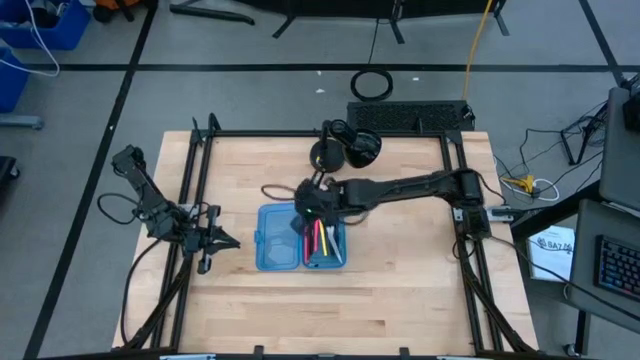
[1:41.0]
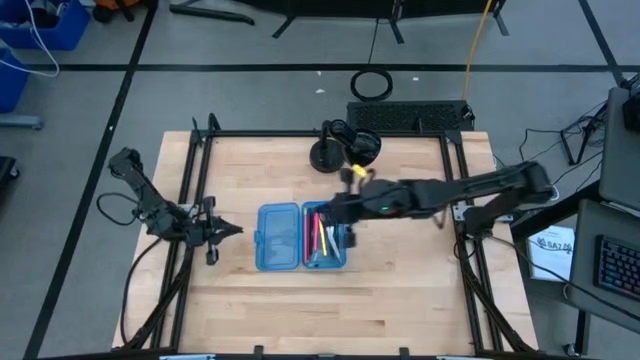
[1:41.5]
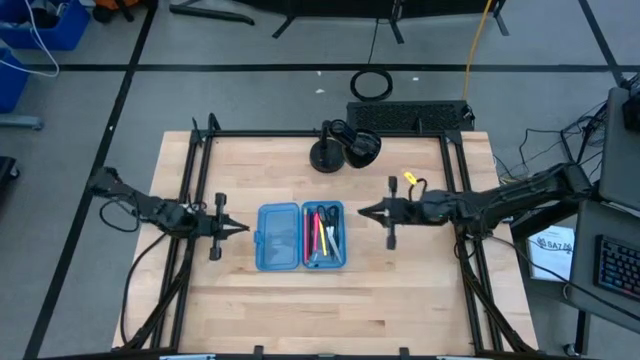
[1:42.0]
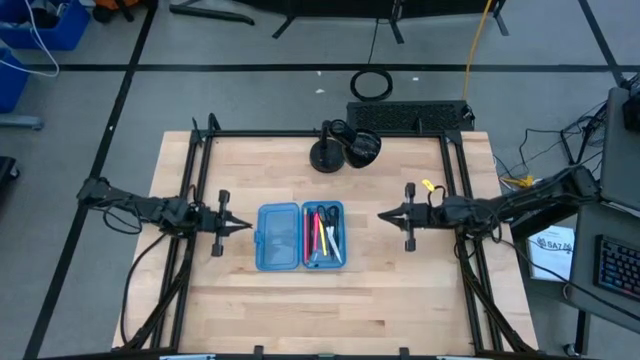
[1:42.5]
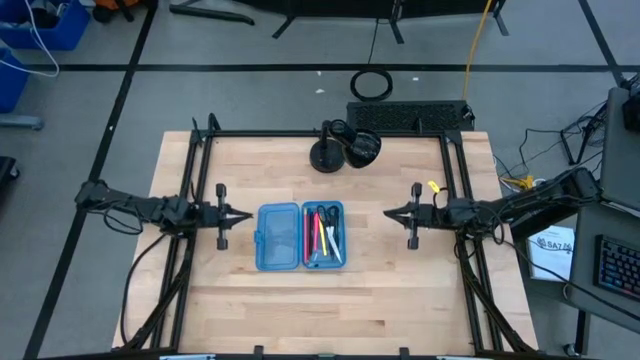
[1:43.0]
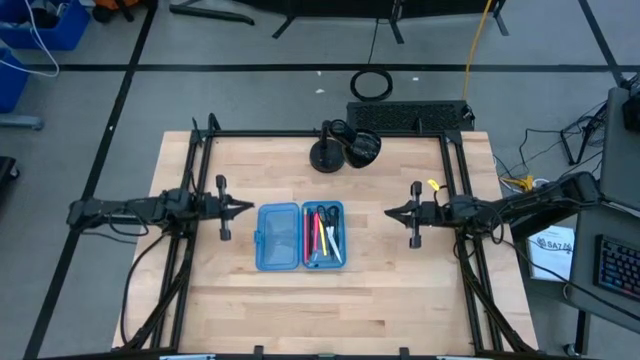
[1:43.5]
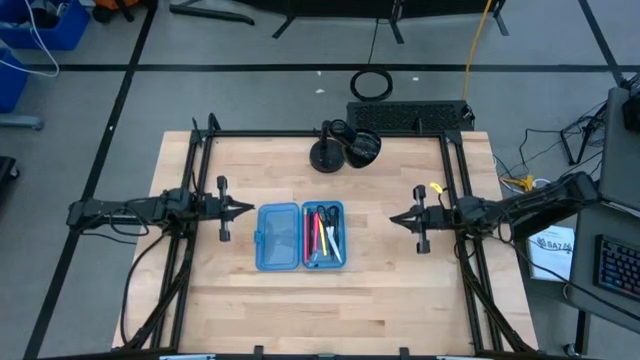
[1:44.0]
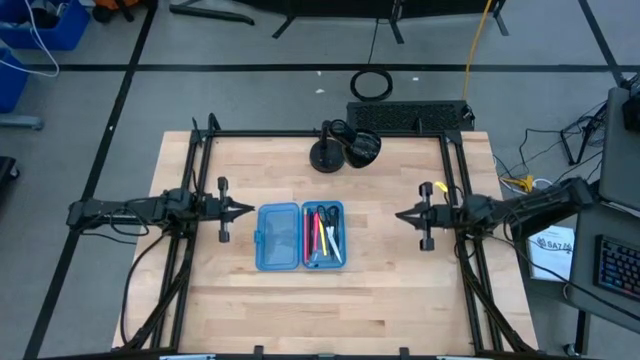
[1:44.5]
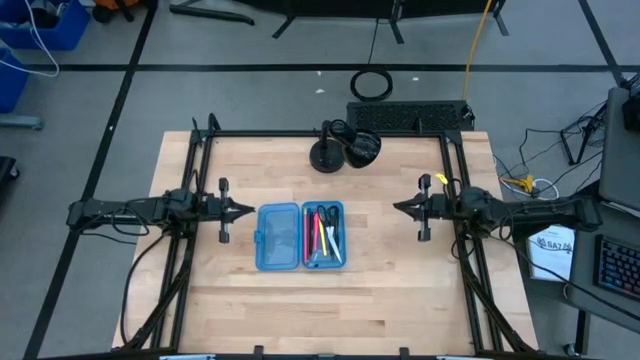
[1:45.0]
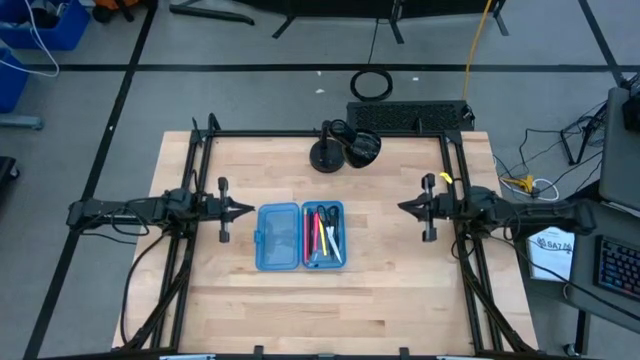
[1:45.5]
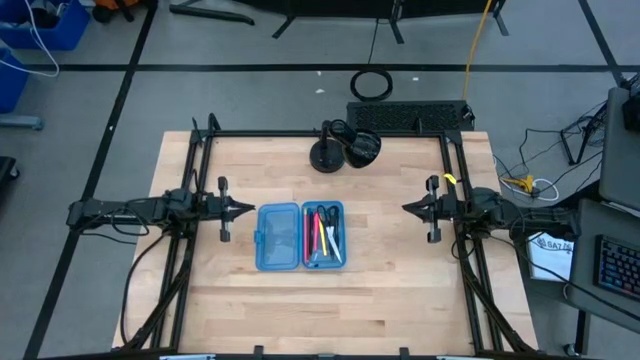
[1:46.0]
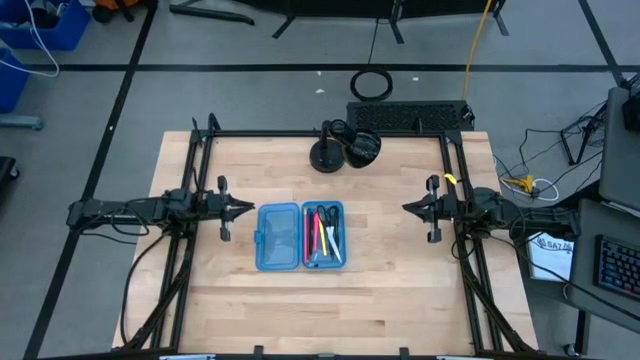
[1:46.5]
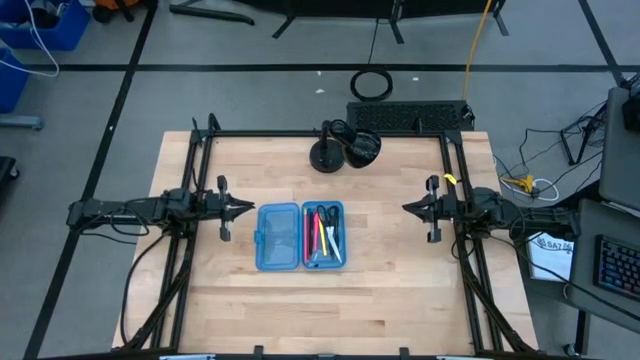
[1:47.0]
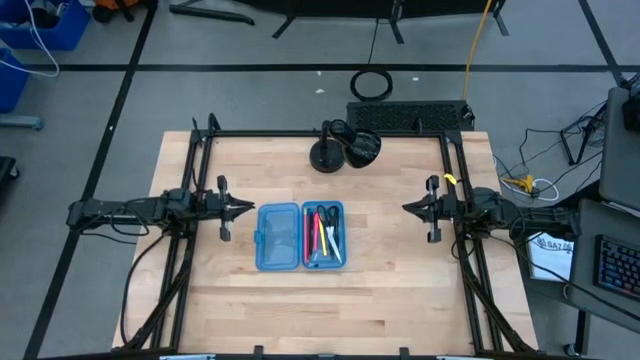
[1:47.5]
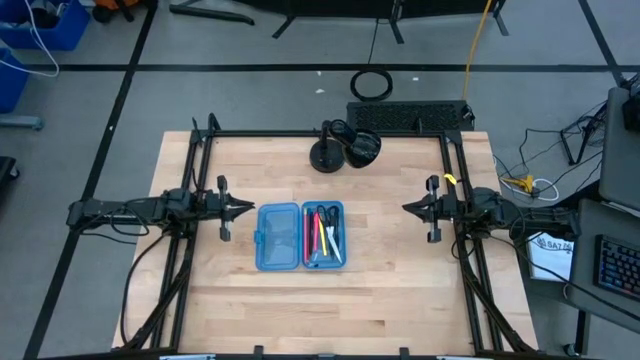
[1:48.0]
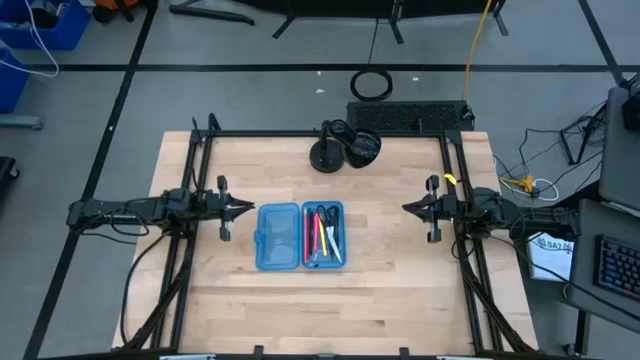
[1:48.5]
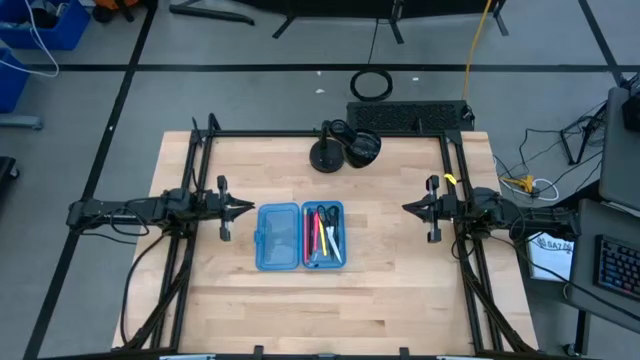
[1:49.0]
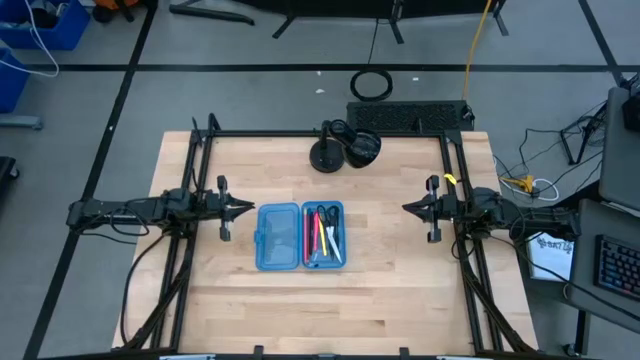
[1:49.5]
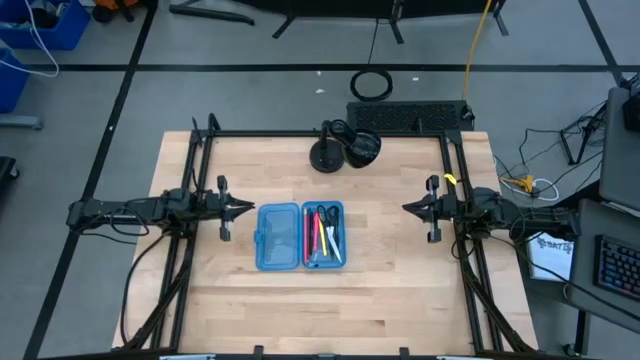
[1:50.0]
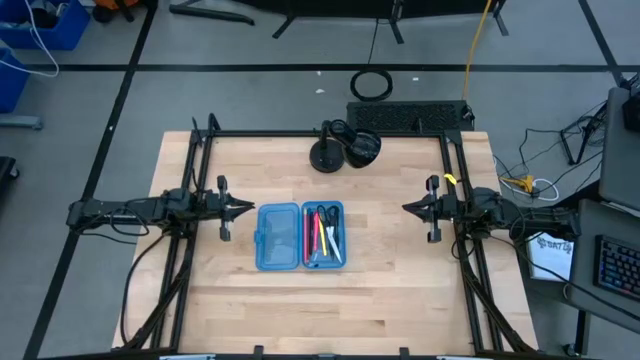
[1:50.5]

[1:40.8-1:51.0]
Task: Pick & place school supplies into a supply box
Return to Home Position

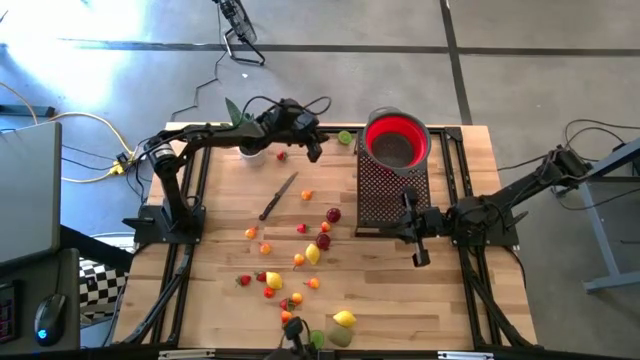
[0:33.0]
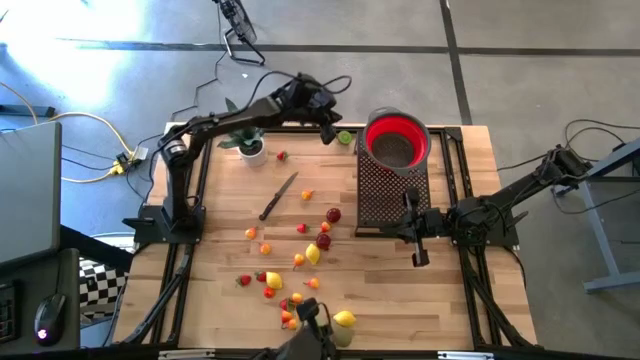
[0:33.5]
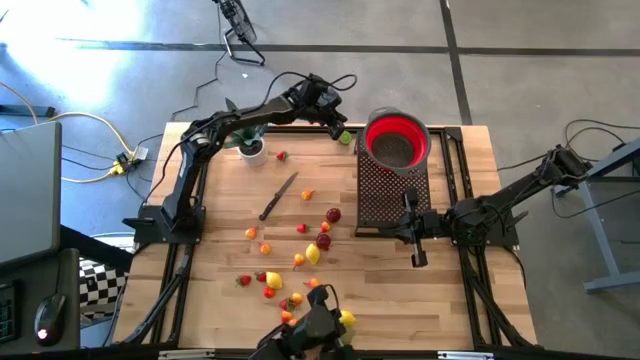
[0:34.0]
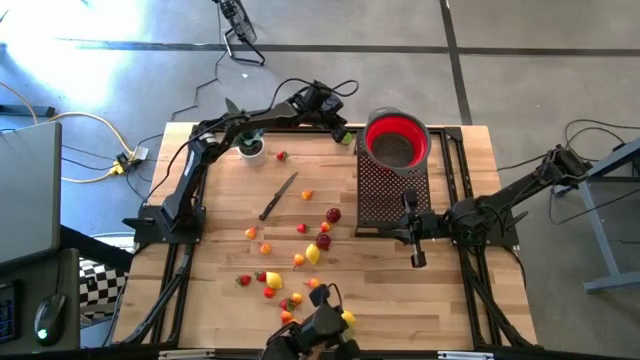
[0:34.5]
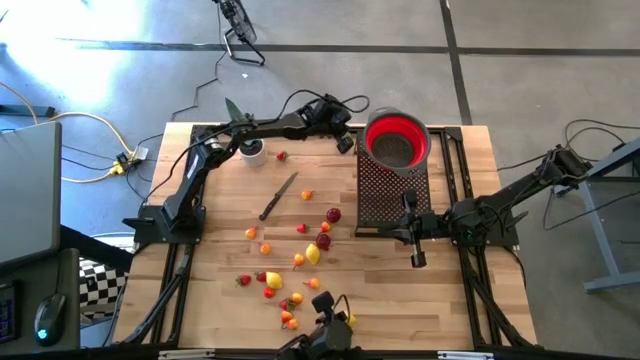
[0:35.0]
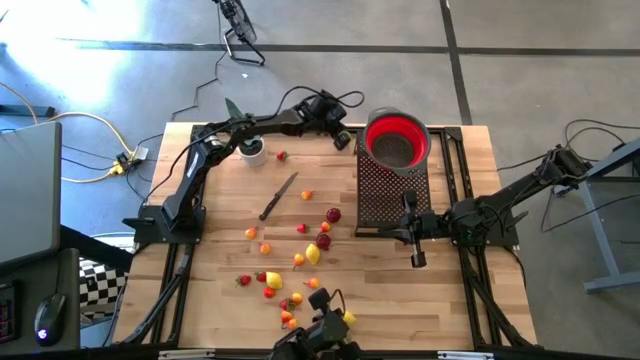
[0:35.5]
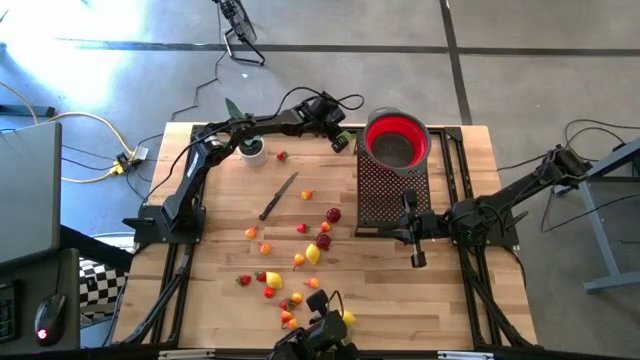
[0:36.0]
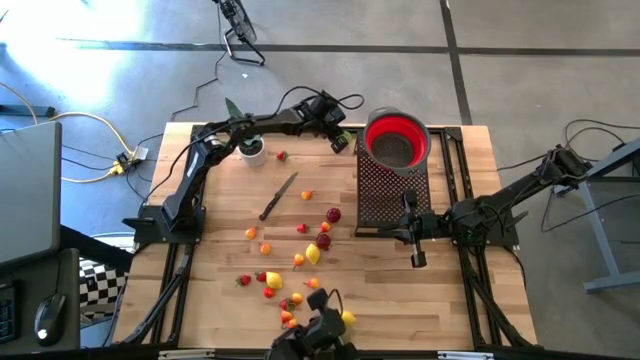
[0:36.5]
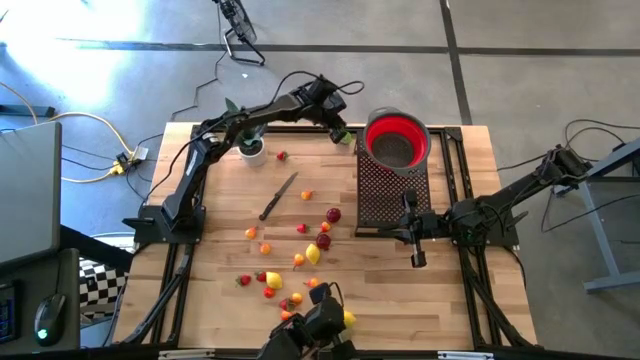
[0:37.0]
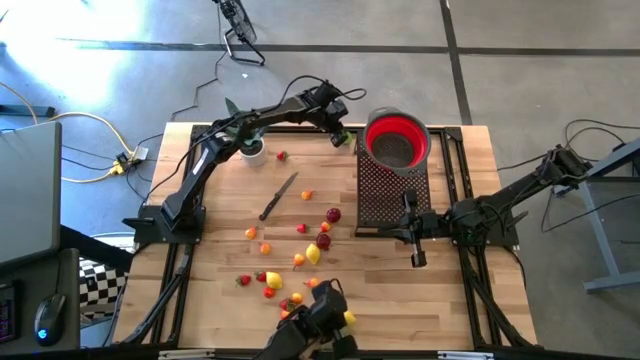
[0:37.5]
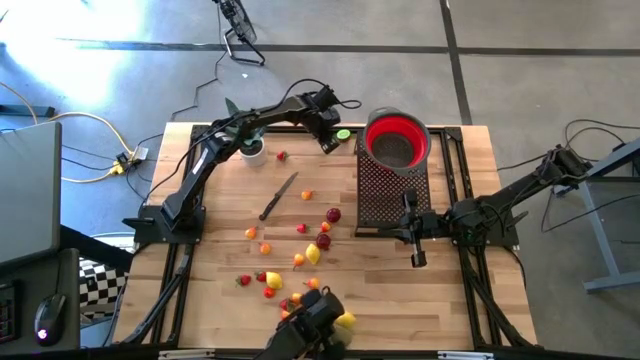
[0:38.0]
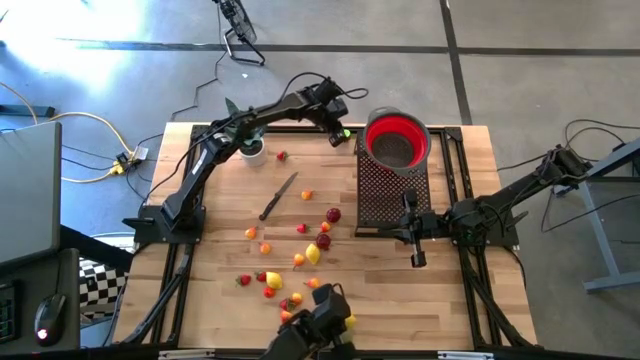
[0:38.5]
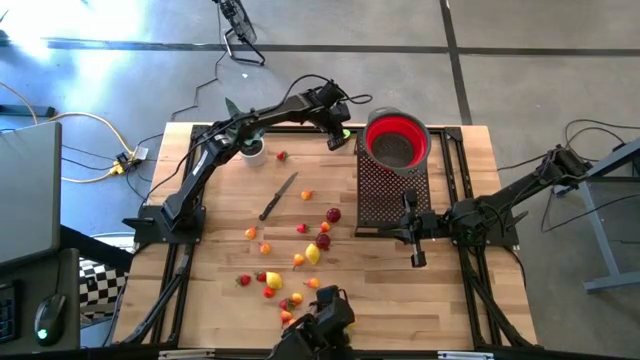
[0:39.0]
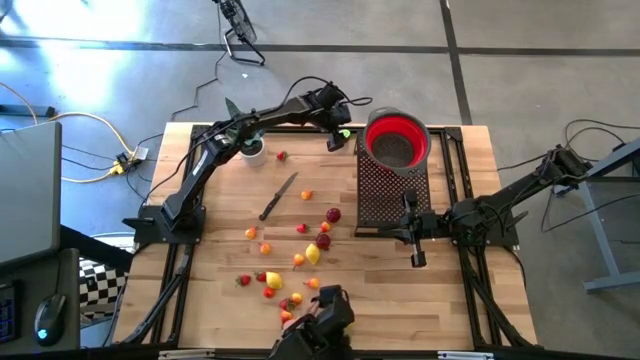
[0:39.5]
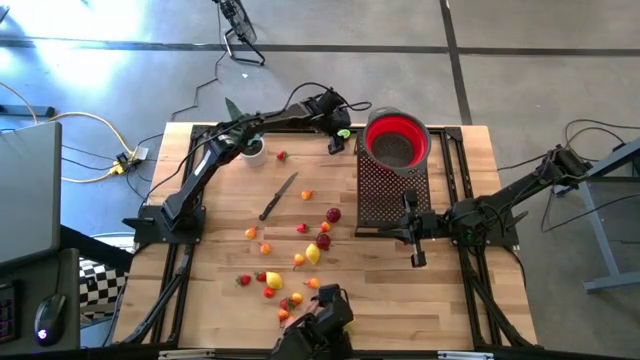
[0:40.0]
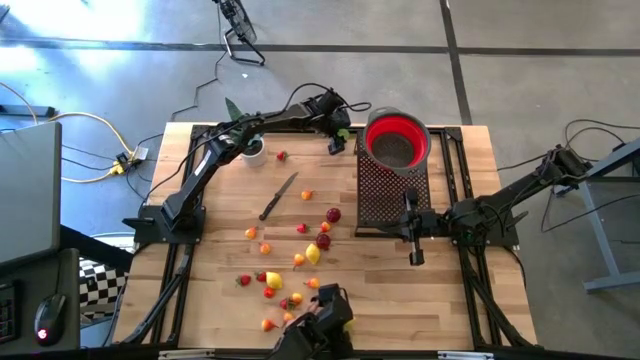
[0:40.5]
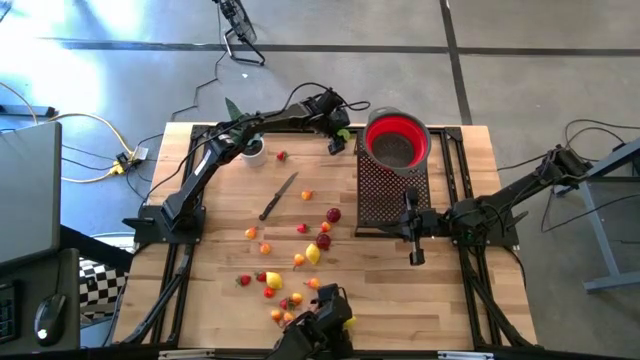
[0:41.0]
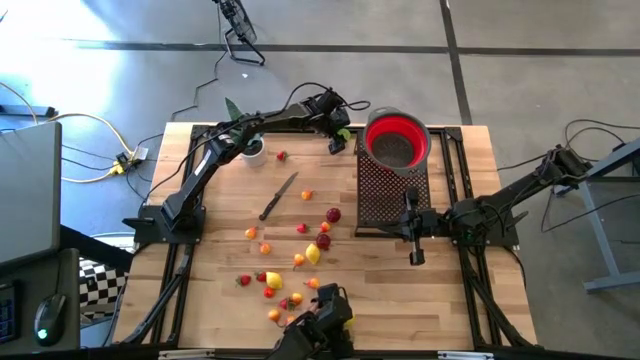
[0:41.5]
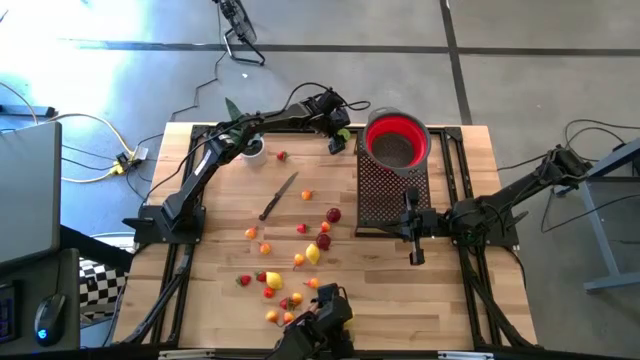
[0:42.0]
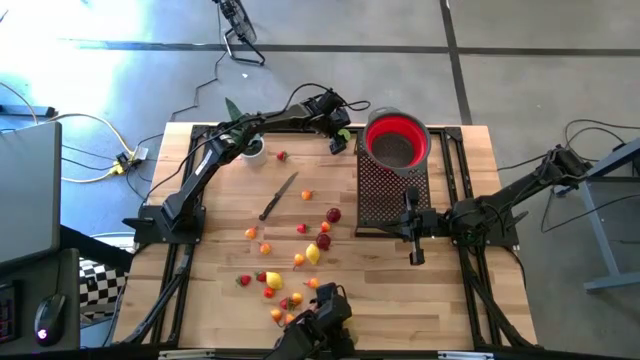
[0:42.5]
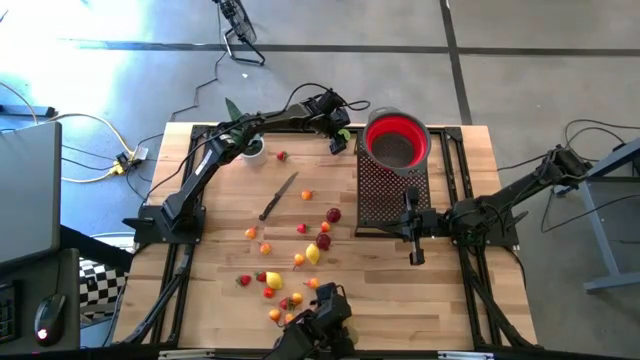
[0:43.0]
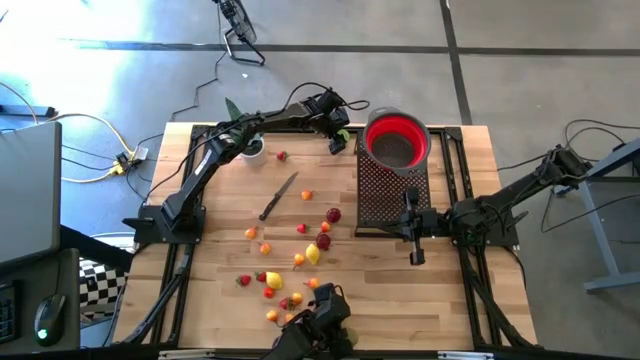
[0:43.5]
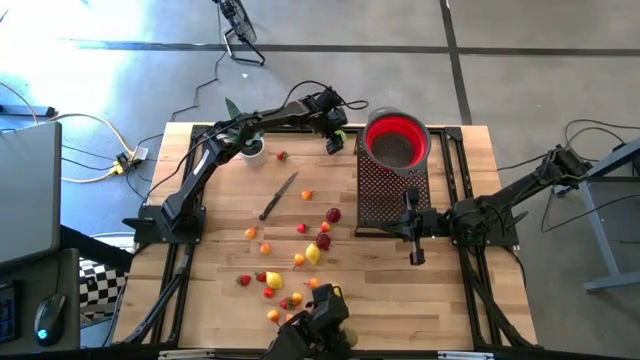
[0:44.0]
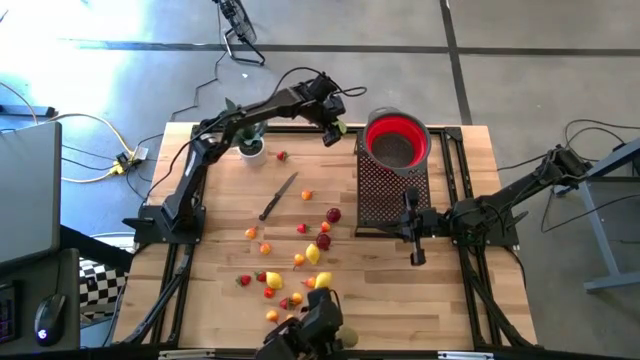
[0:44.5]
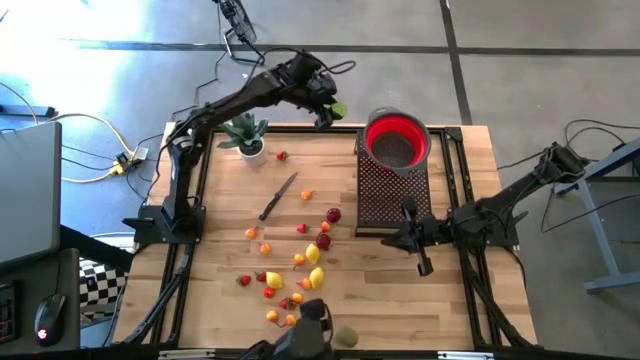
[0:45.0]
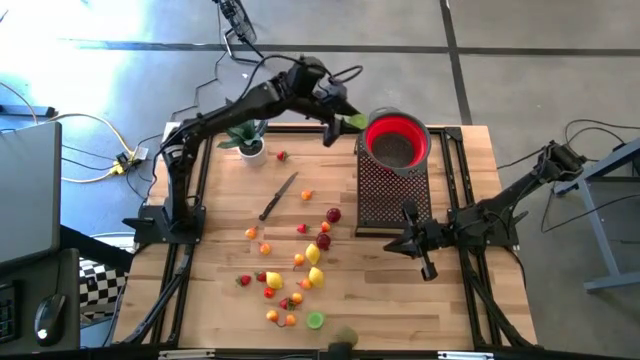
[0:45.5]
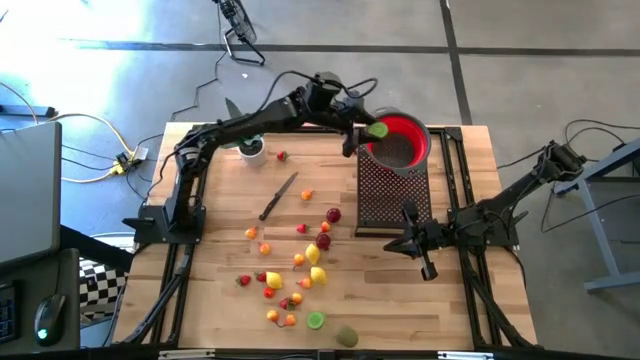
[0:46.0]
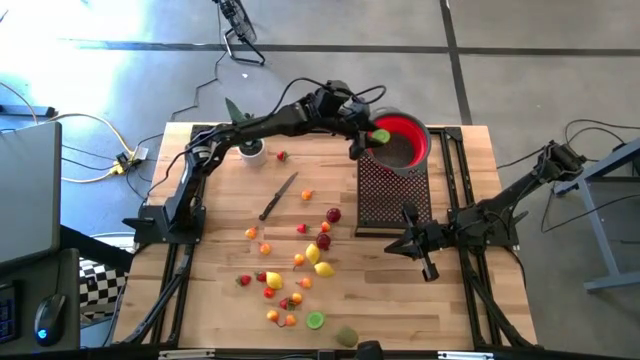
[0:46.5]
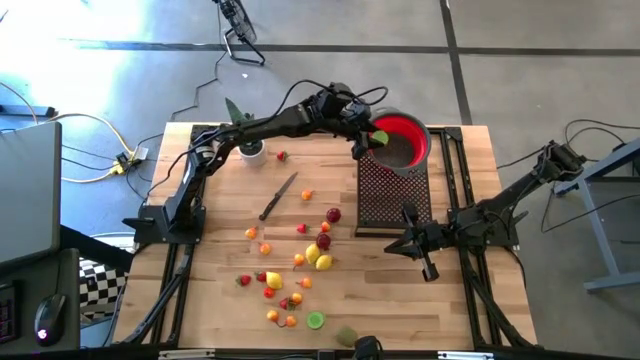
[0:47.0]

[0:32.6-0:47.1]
Task: Pick & Place Fruit
Put the kiwi into the strainer bowl on the shelf
